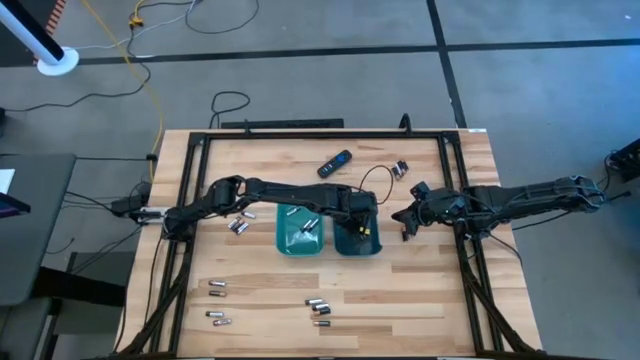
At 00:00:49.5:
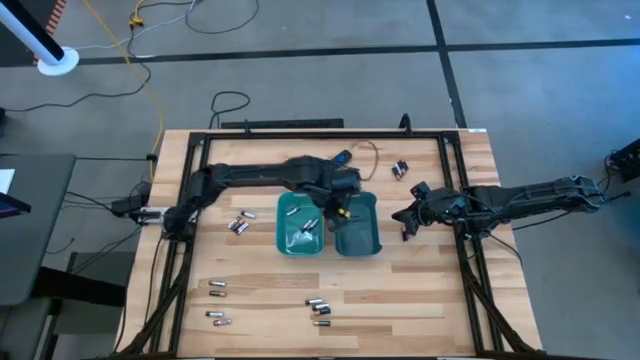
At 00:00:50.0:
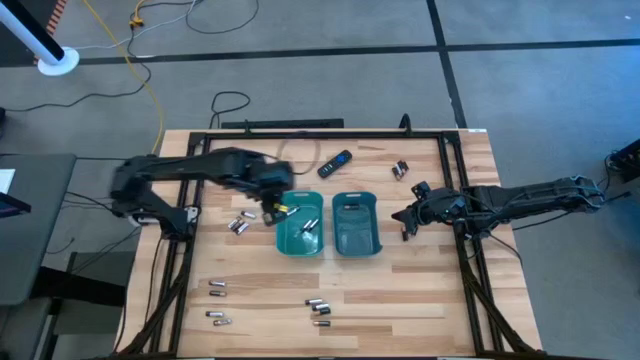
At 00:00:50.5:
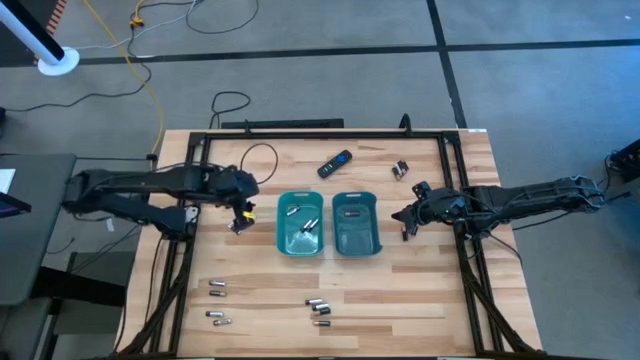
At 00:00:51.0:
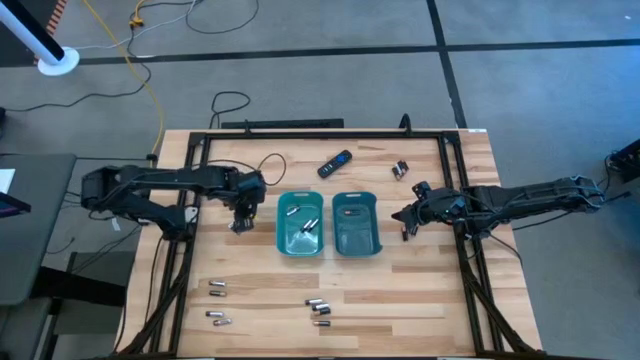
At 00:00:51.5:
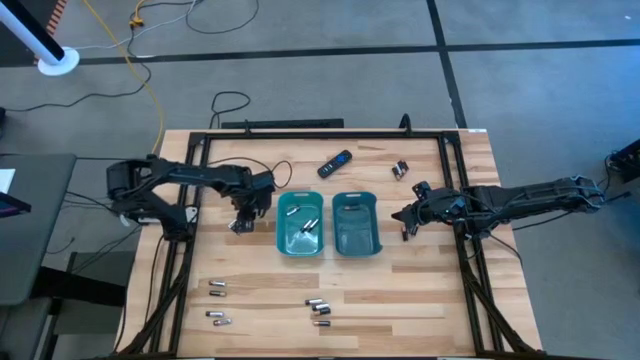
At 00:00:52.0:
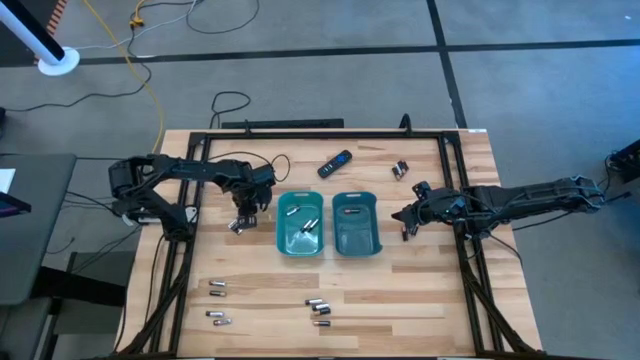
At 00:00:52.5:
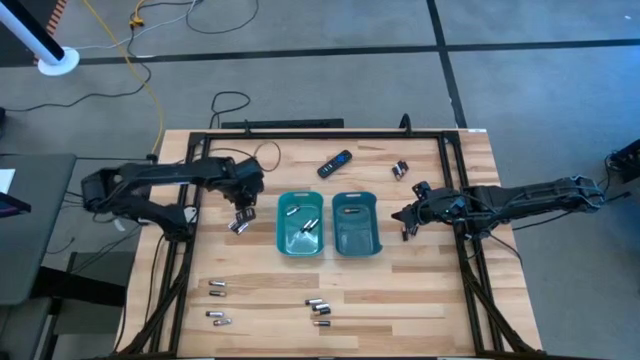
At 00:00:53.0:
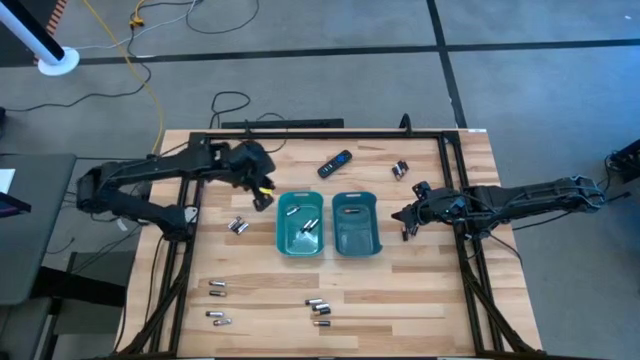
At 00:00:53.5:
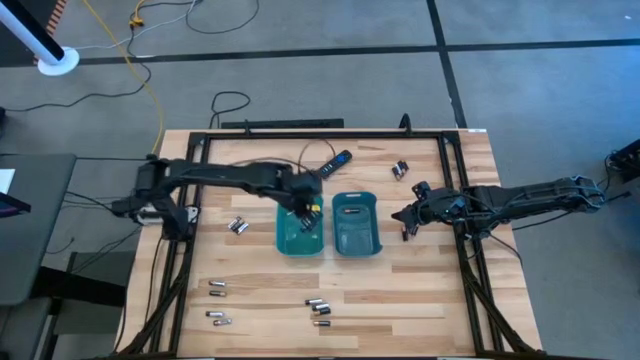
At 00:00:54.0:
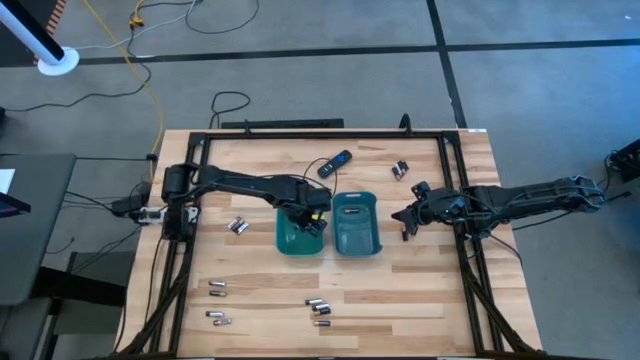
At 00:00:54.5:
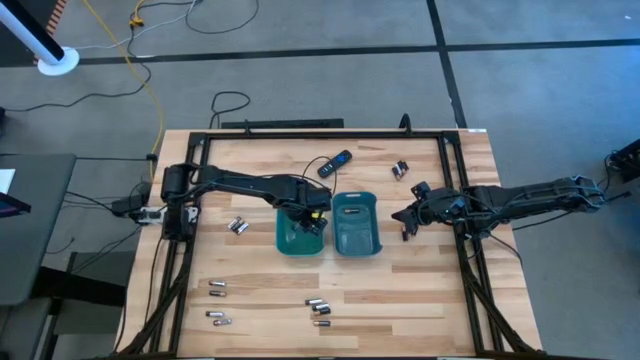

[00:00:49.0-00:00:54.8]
Task: Sort batteries
Put the silver and black battery into the green bin

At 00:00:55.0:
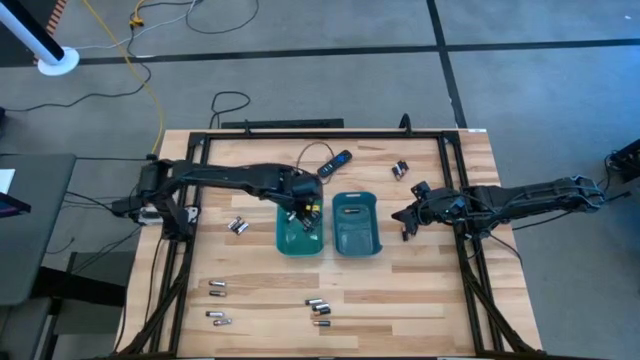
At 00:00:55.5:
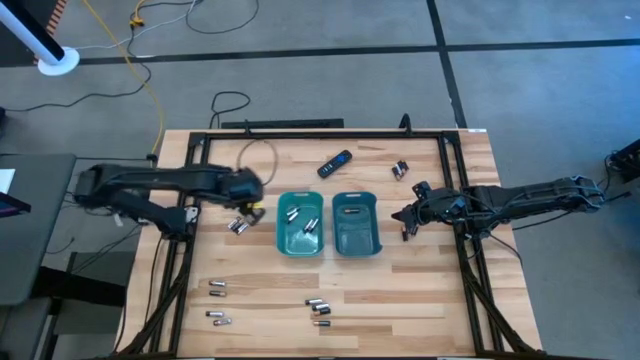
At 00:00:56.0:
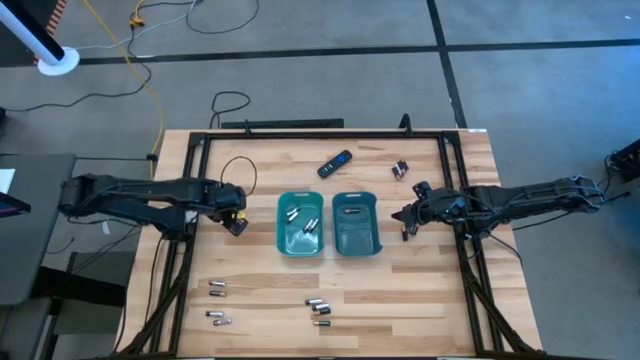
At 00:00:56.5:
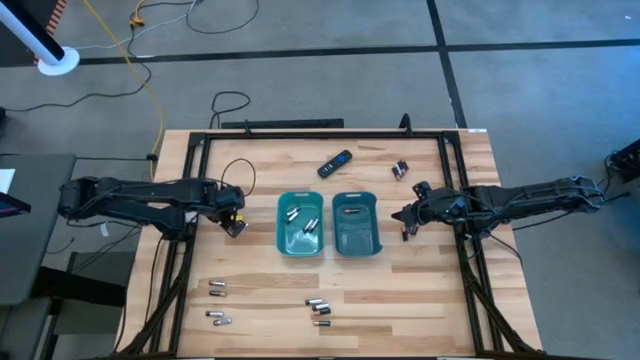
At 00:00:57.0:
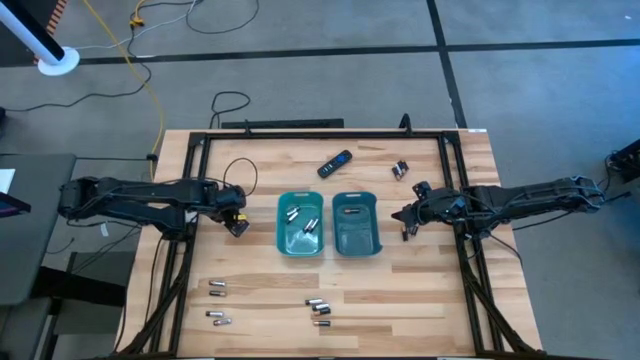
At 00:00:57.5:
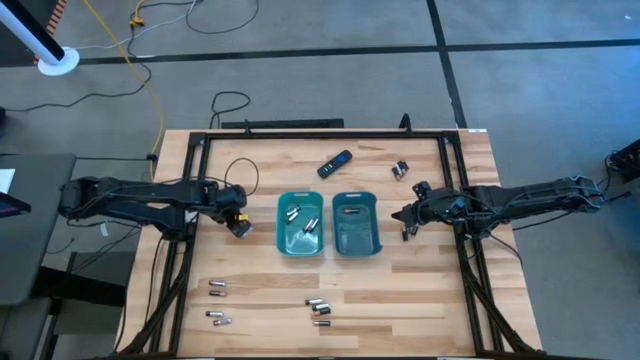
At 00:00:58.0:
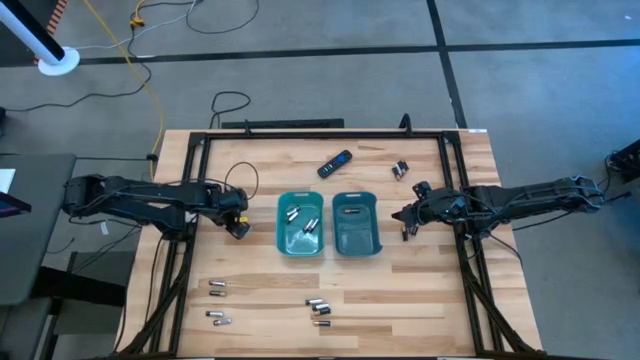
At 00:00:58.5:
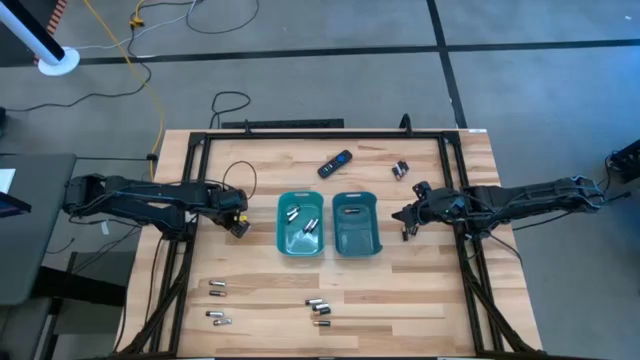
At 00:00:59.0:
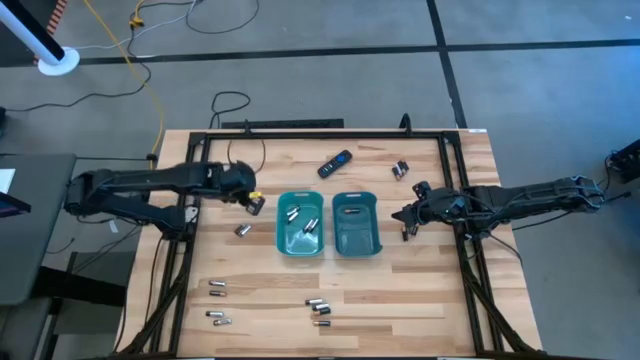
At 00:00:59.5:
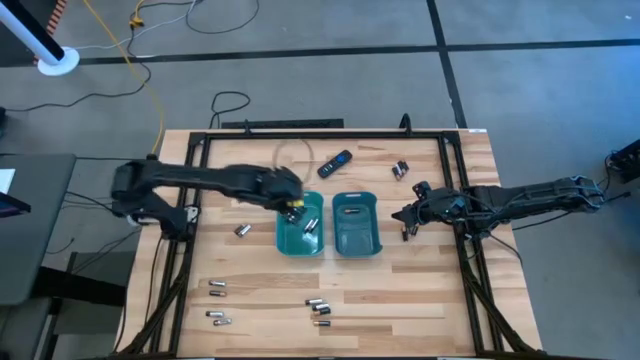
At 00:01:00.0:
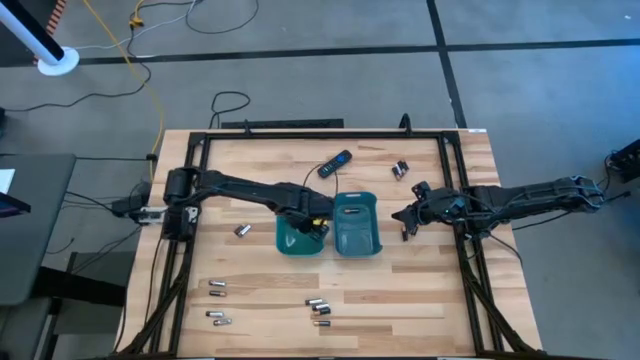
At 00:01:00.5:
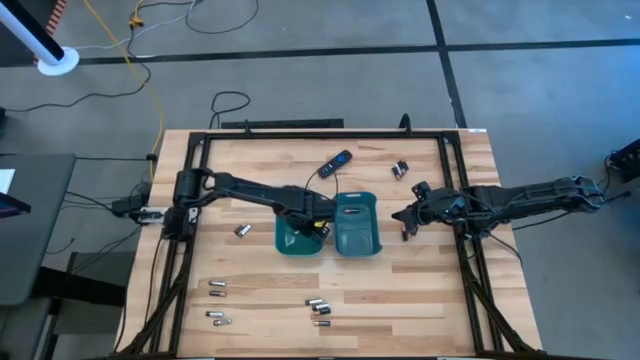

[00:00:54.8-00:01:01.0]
Put the silver and black battery into the green bin

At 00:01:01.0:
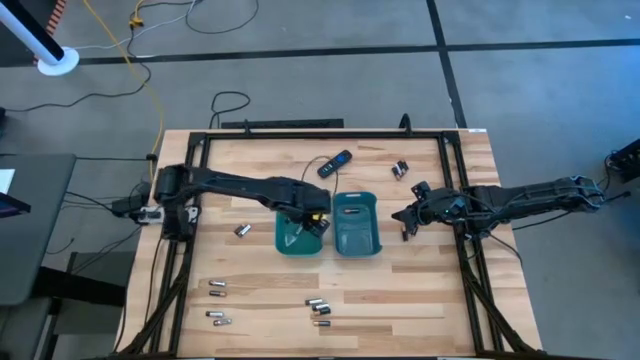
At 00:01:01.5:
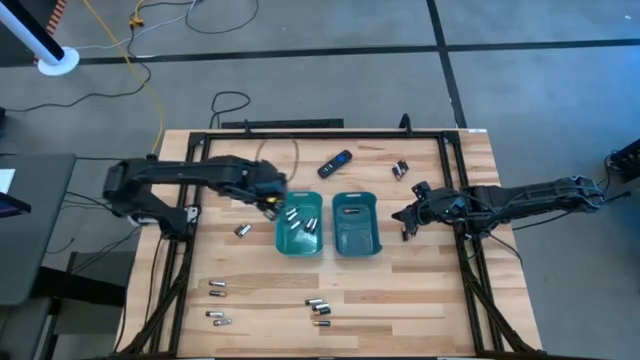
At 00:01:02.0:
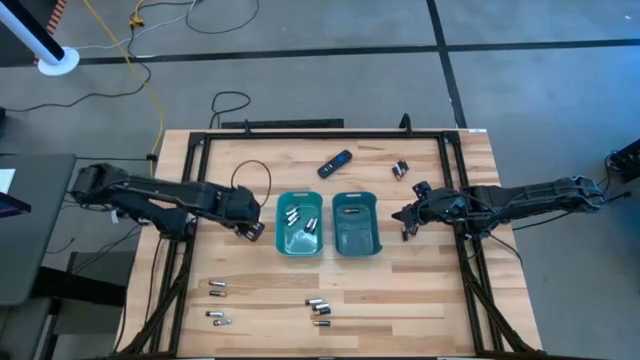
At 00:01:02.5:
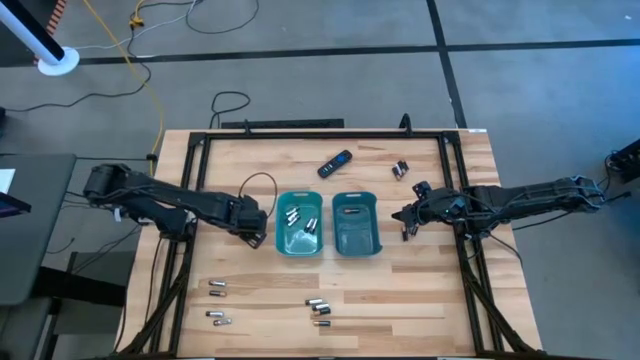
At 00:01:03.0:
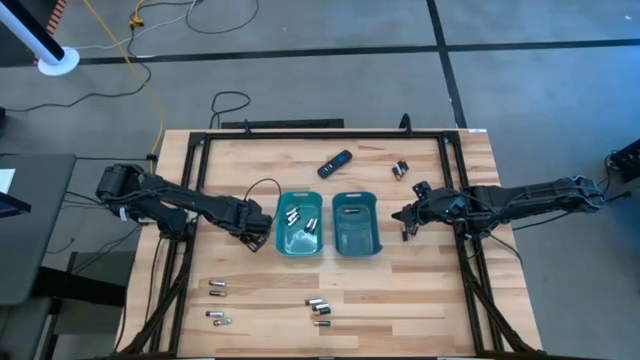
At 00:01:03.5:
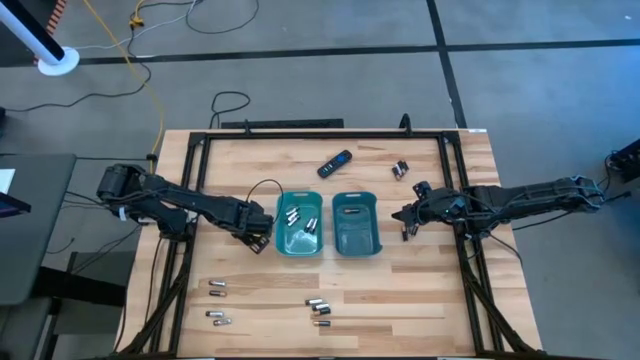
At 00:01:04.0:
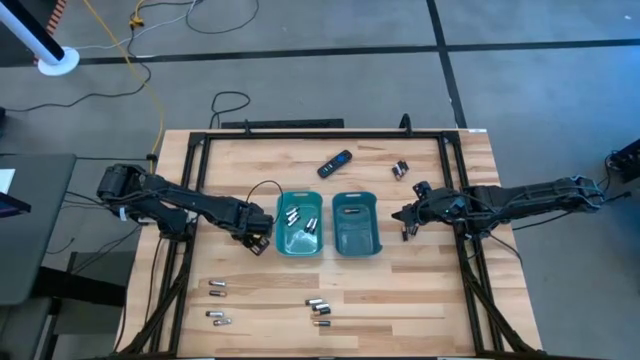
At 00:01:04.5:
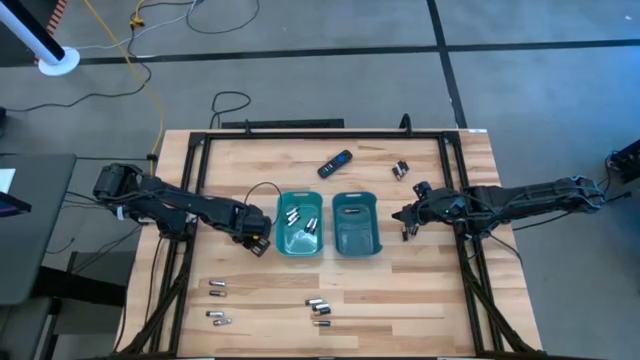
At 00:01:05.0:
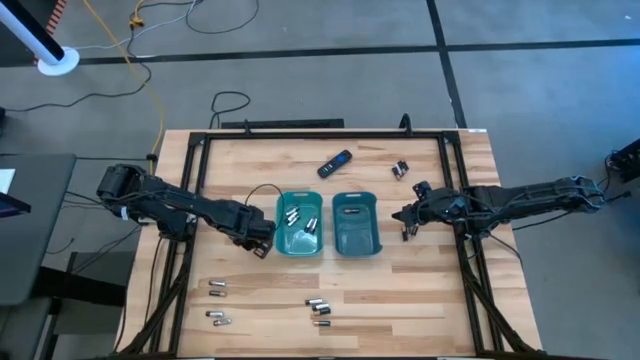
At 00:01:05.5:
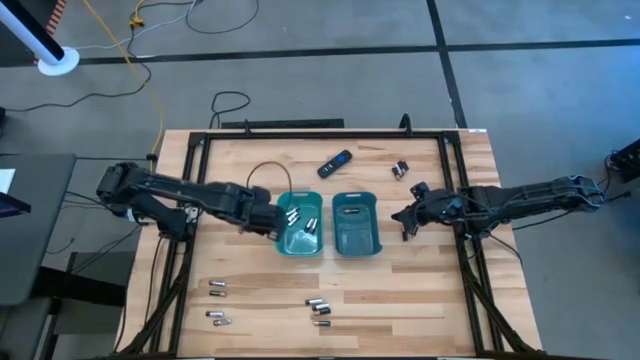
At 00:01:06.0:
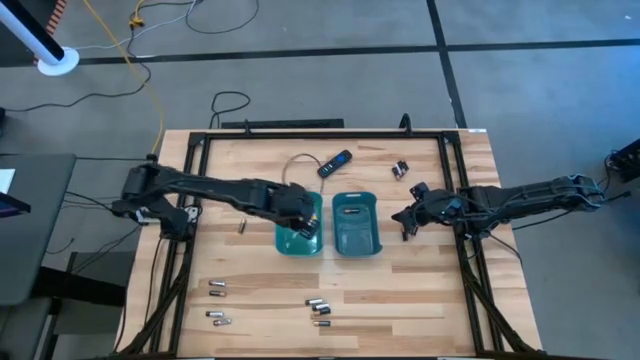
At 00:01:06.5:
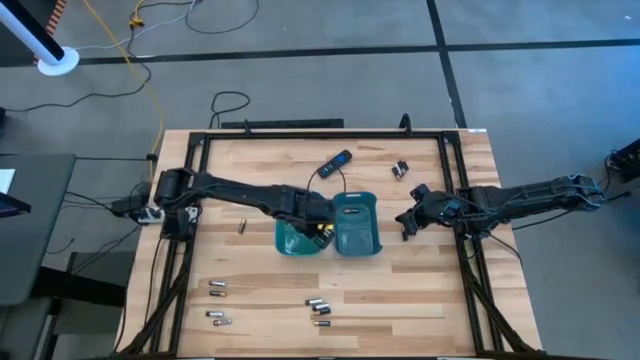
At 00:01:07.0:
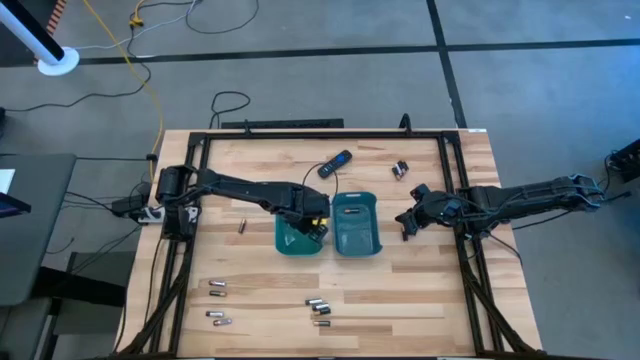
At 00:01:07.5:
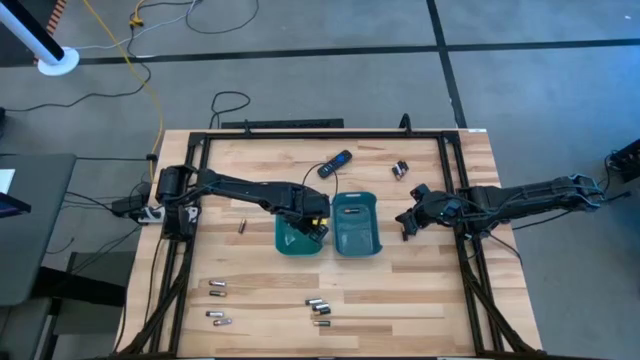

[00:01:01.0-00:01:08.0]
Put the silver and black battery into the green bin

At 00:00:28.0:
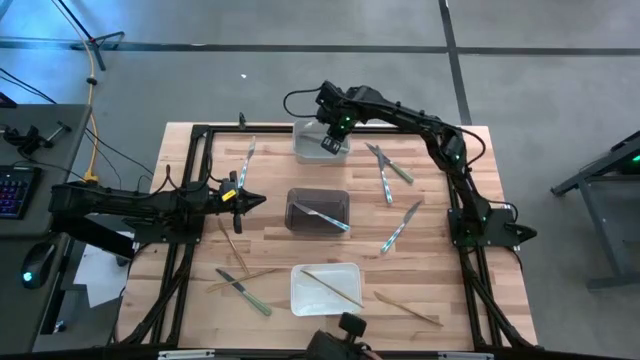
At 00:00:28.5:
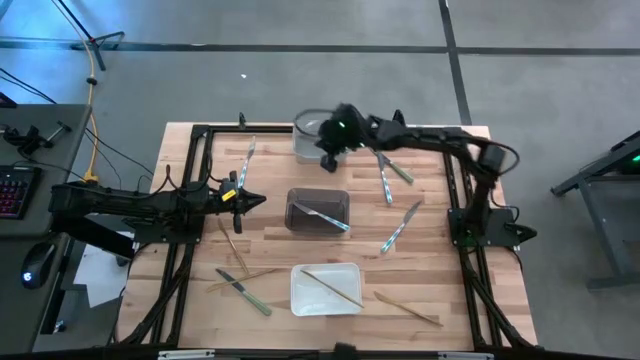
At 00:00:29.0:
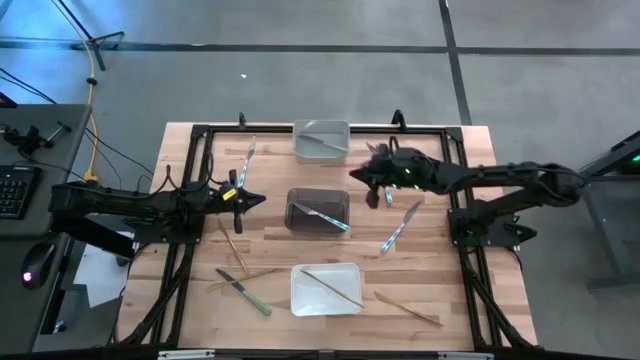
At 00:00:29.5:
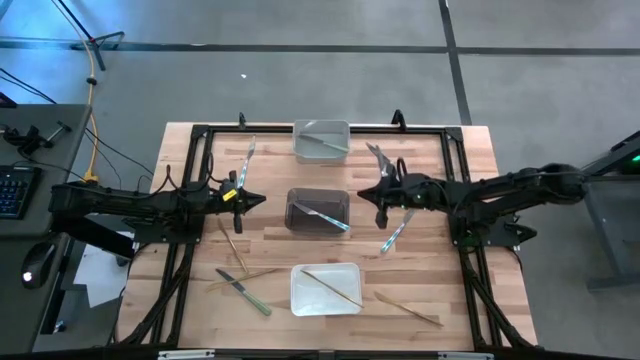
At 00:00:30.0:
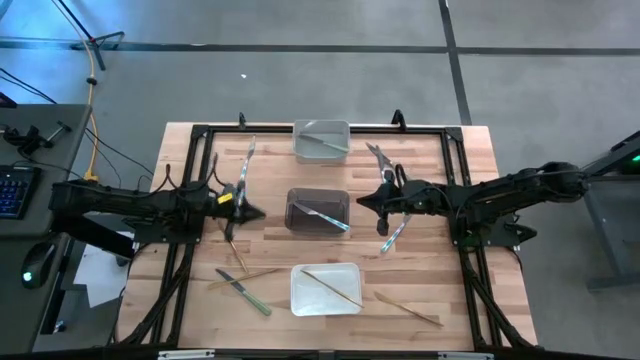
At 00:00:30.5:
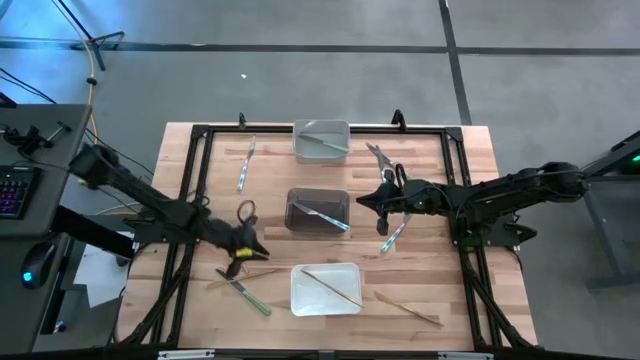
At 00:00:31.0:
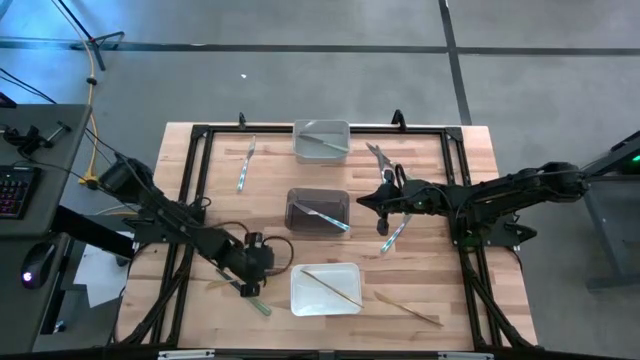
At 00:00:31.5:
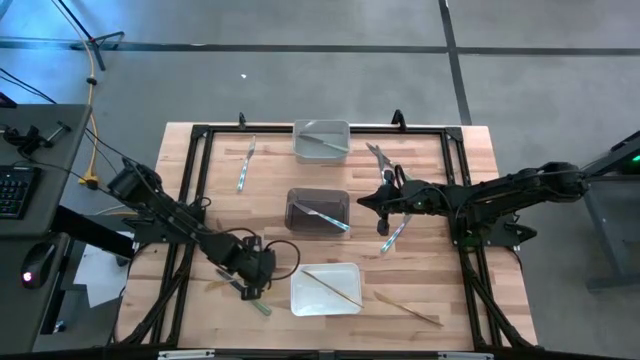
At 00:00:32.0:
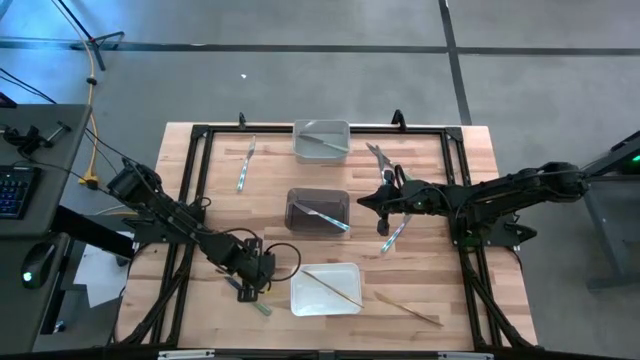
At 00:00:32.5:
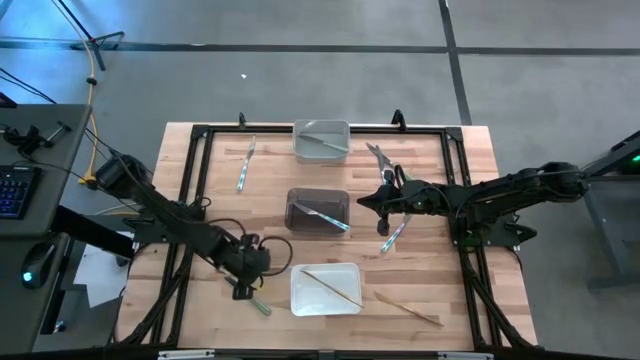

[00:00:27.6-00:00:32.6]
Task: Sort silverware by color (type)
Put the gold table knife into the white bin
